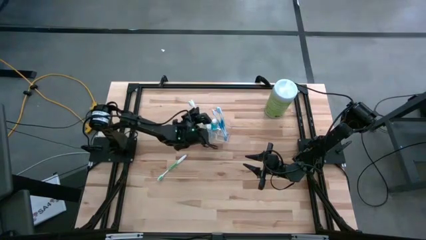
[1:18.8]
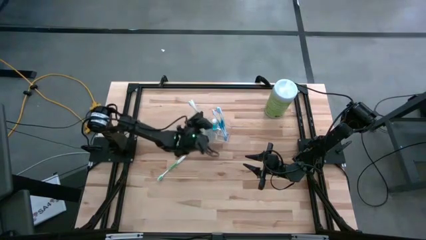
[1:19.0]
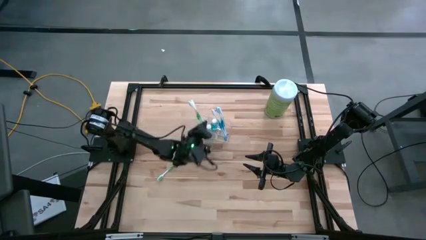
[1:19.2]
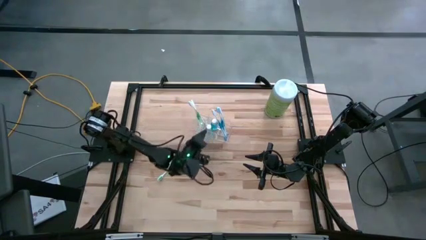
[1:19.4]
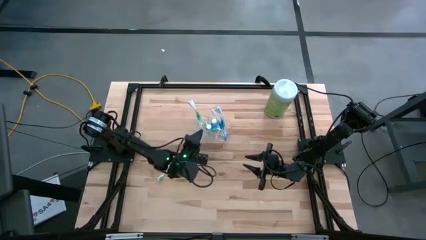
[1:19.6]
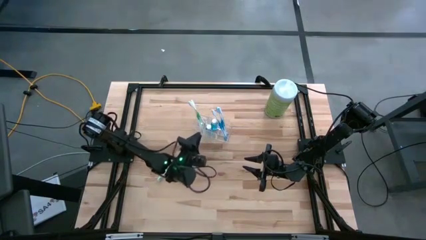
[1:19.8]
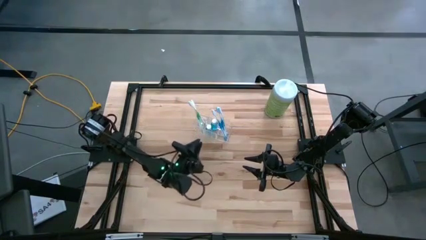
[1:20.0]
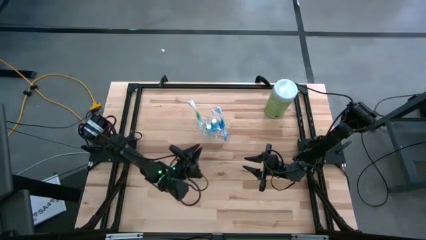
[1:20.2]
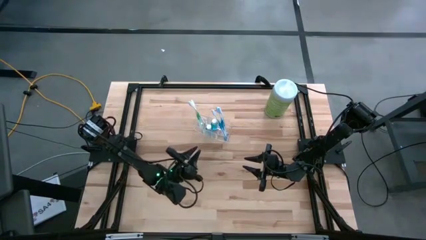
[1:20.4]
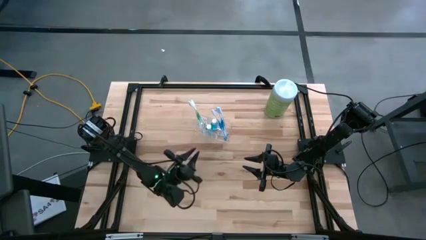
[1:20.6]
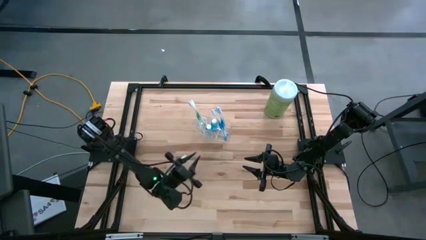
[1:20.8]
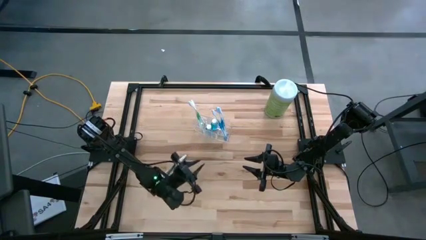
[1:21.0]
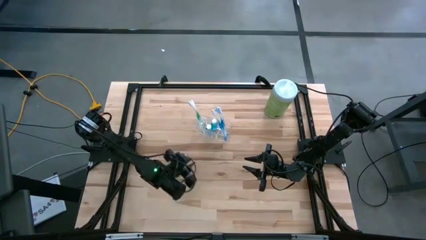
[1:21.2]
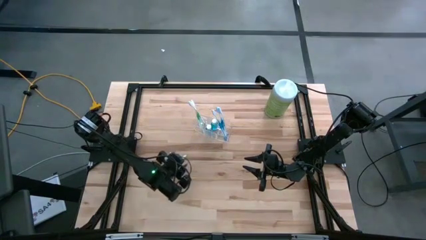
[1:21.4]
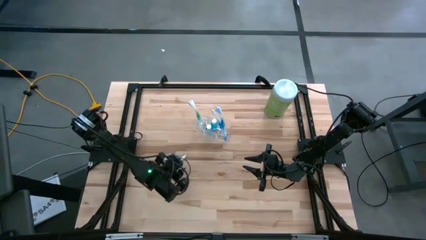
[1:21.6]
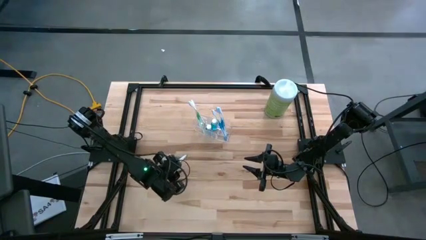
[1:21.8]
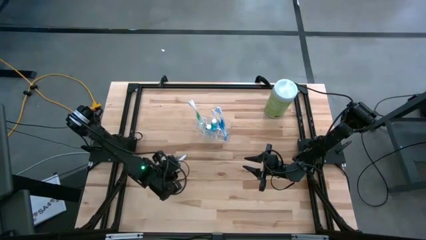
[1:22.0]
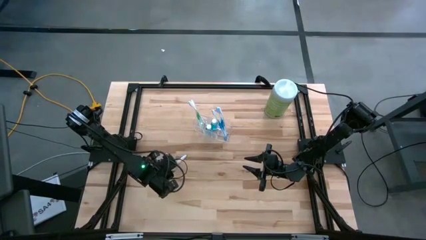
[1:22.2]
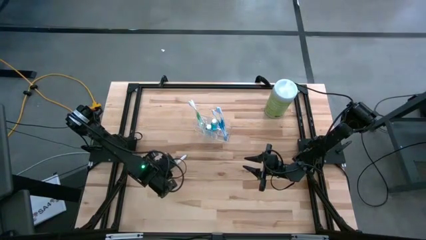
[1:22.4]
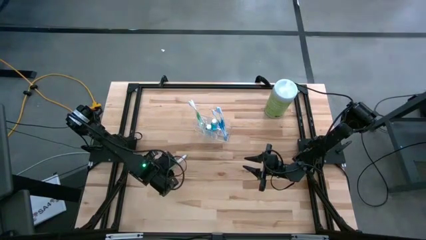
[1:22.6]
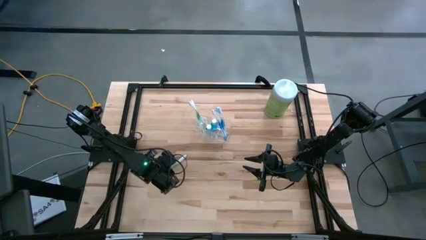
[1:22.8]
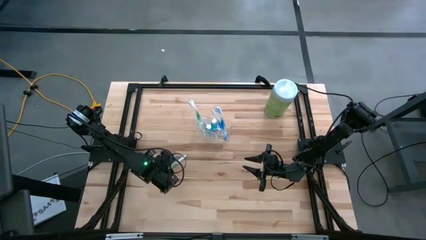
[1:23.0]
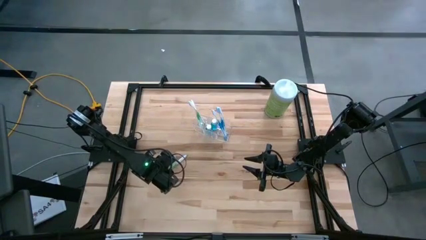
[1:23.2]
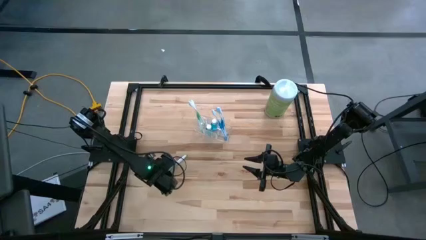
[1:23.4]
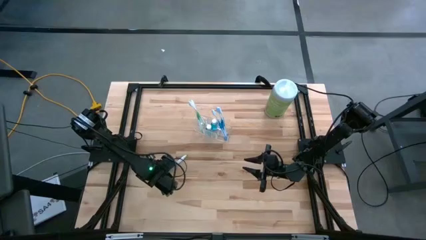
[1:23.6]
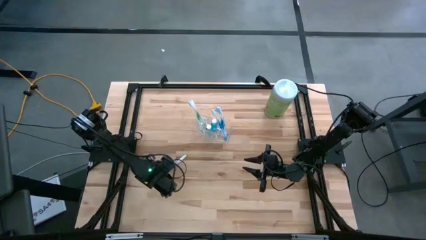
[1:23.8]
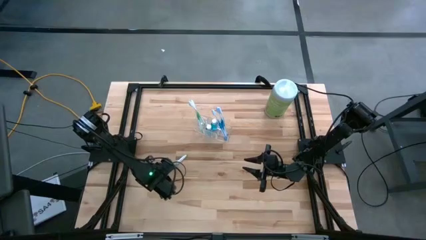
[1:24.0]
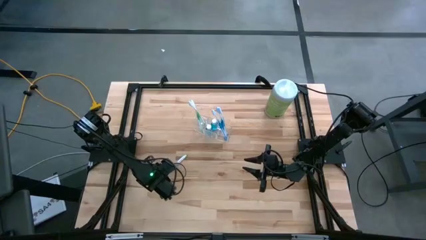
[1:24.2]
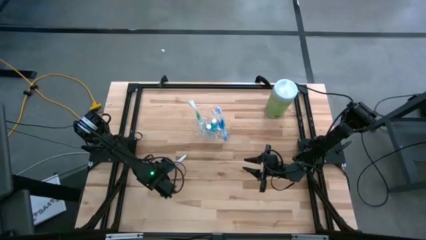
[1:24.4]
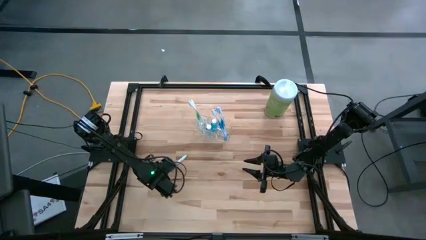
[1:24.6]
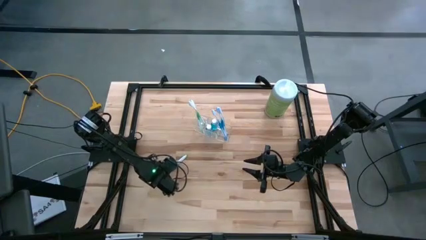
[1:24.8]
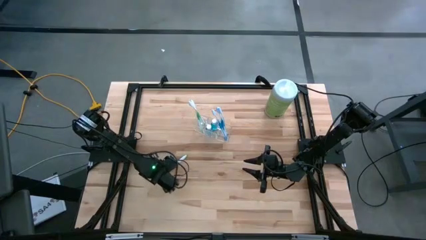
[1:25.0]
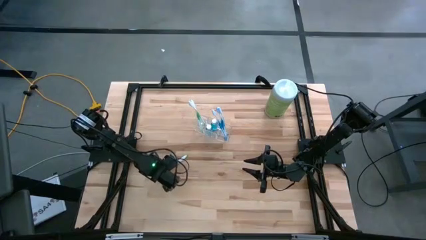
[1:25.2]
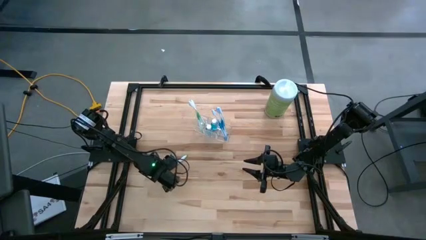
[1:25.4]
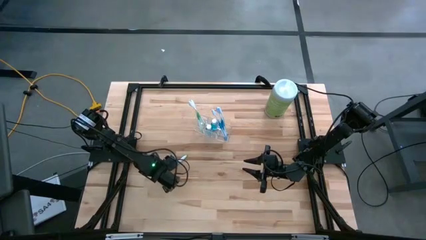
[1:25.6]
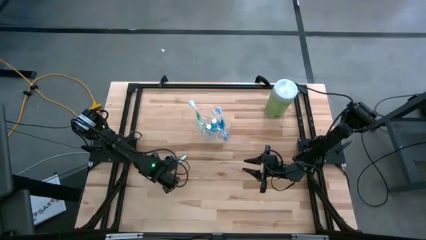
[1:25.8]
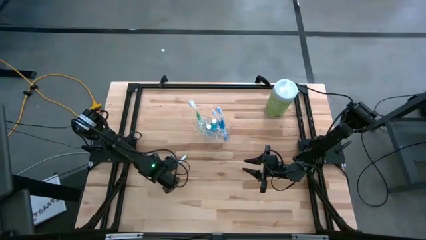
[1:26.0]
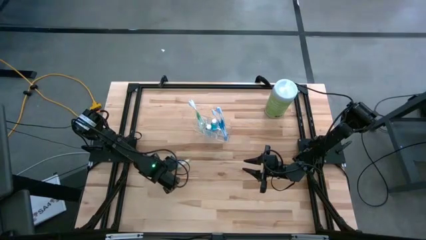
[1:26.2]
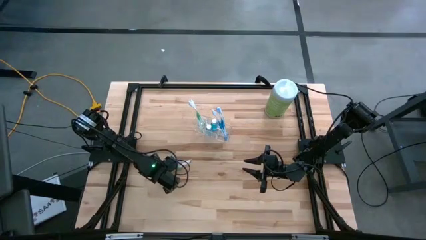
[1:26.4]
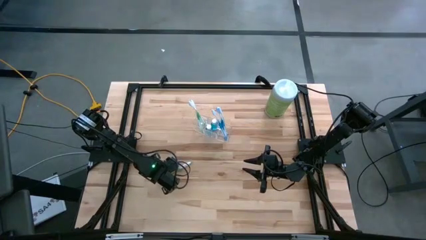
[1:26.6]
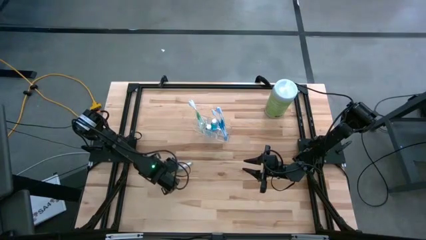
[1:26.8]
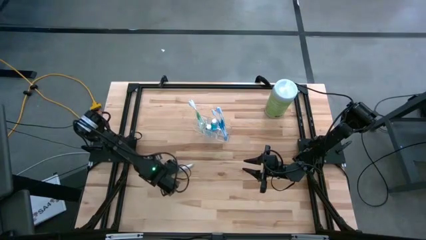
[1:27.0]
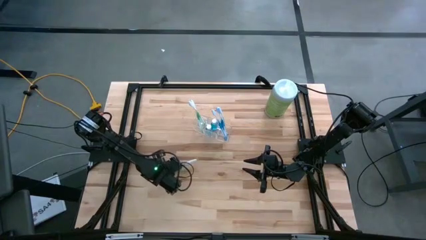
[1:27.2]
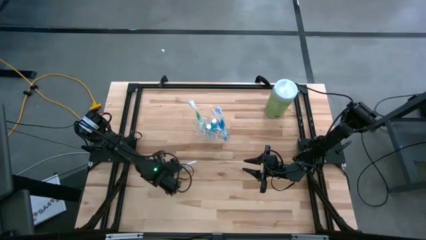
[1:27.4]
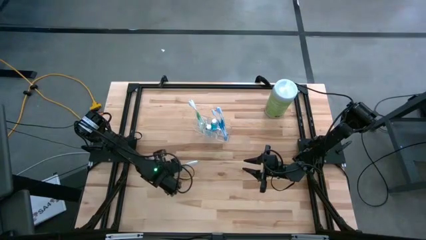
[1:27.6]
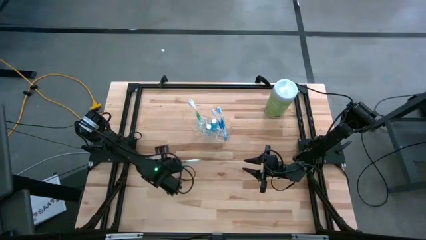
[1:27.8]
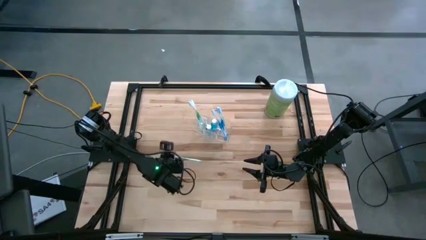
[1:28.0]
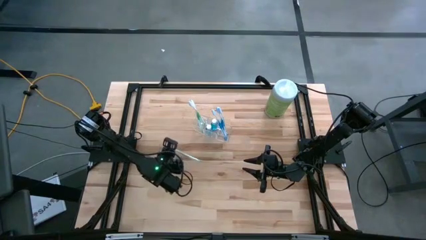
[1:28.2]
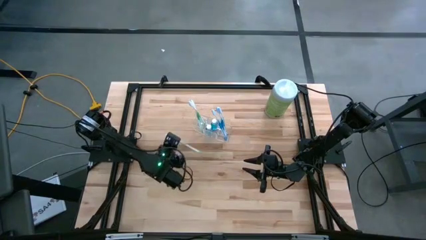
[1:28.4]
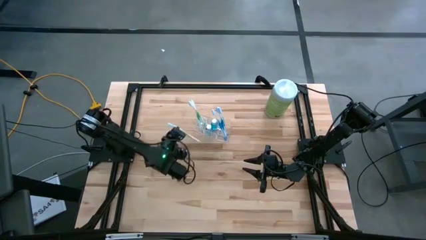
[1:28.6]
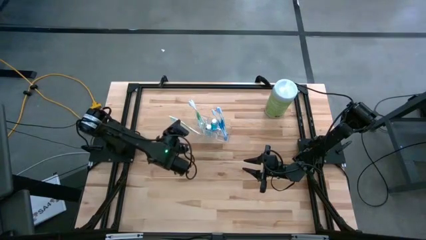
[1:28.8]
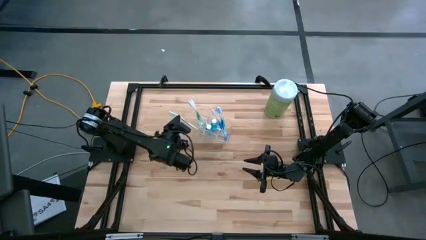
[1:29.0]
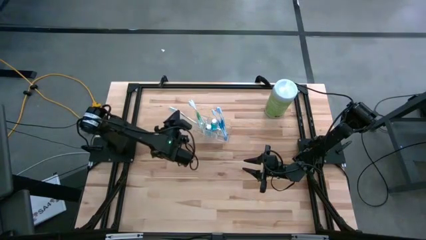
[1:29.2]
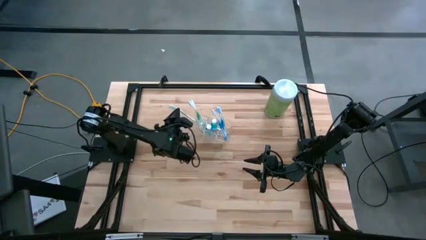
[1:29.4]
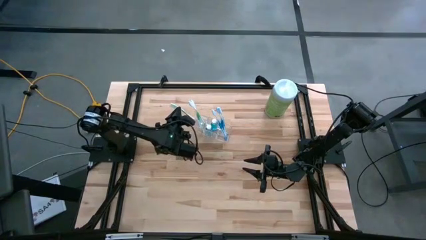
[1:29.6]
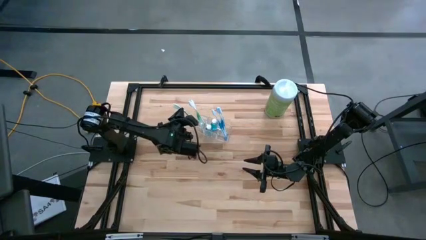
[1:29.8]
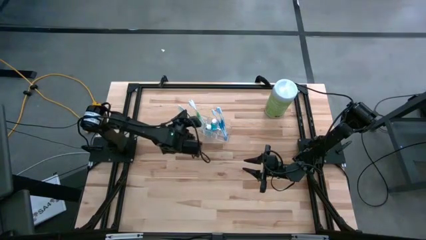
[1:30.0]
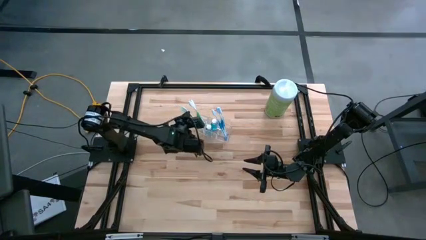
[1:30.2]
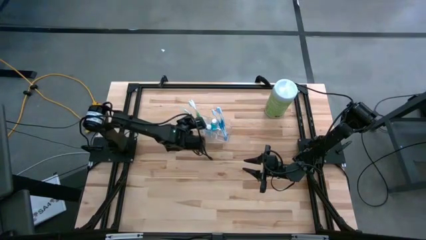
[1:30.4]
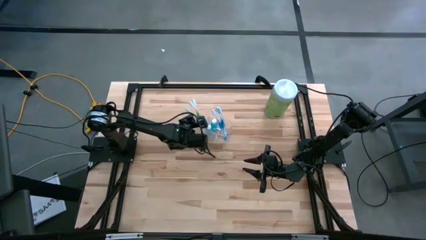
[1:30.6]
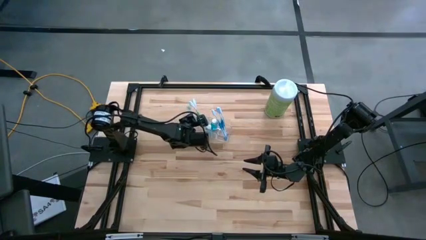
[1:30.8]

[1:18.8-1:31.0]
Task: Pick & Place toothbrushing station
Put the green toothbrush into the transparent organizer
